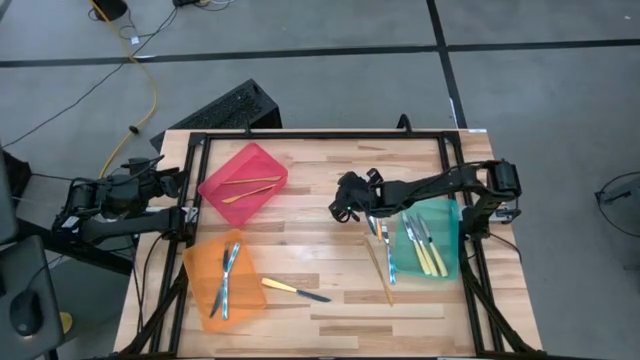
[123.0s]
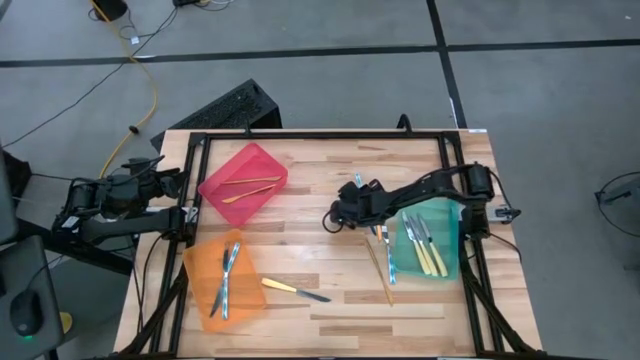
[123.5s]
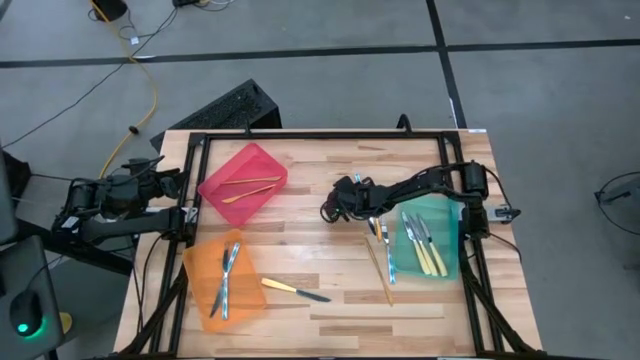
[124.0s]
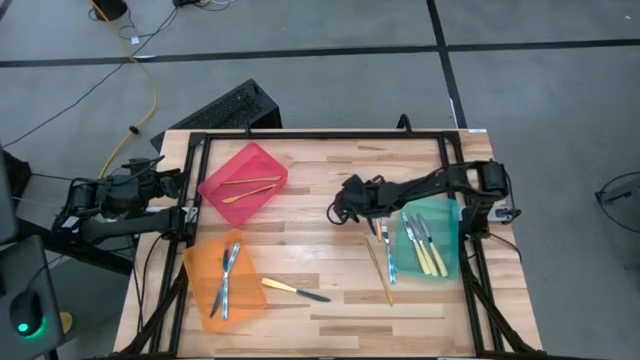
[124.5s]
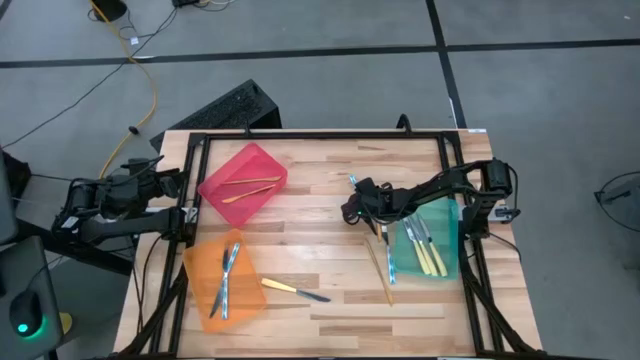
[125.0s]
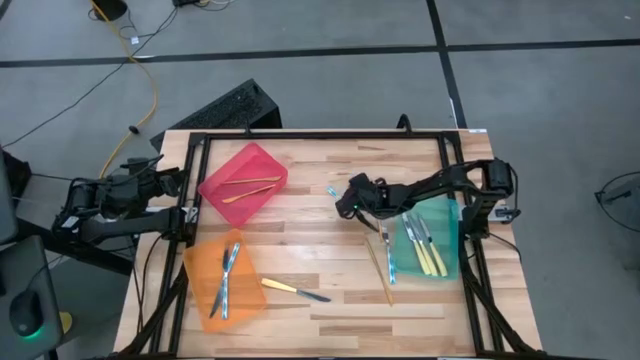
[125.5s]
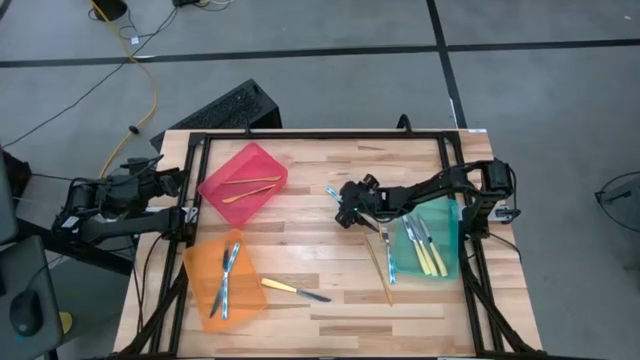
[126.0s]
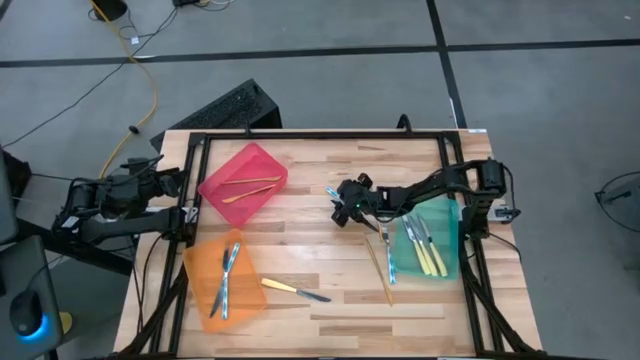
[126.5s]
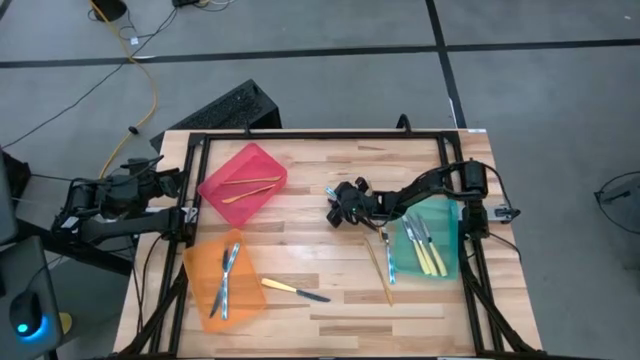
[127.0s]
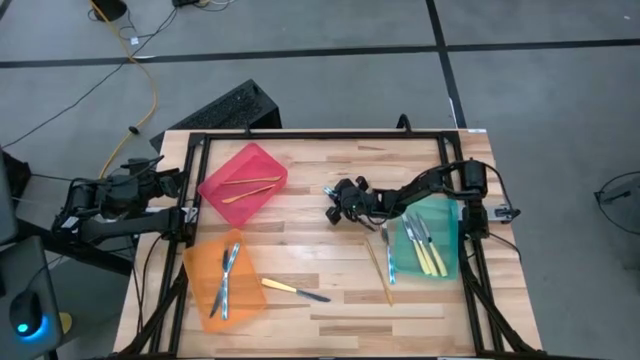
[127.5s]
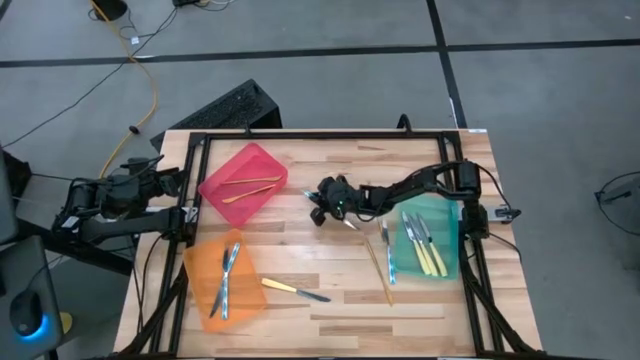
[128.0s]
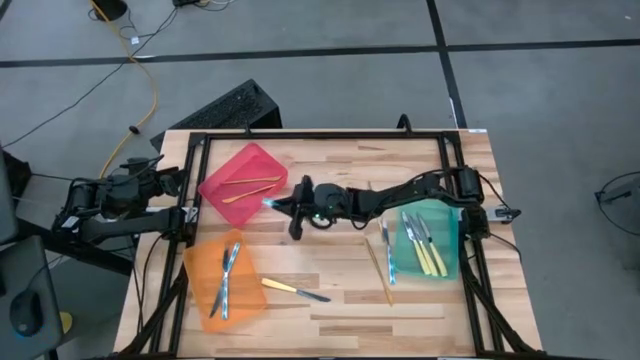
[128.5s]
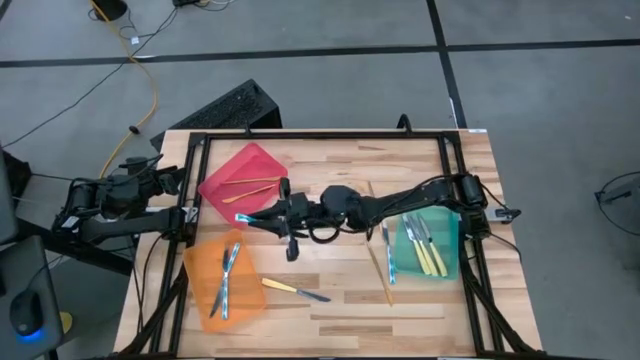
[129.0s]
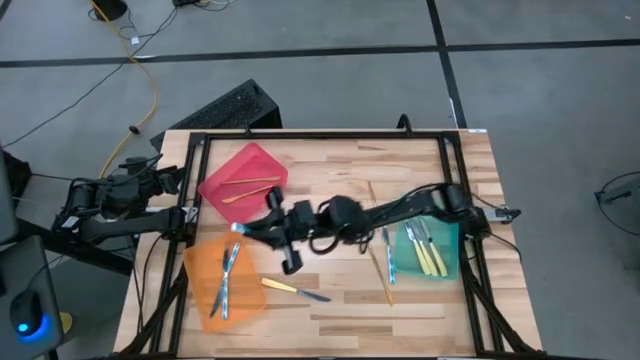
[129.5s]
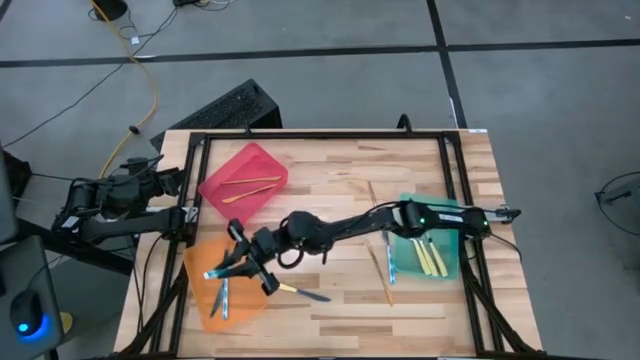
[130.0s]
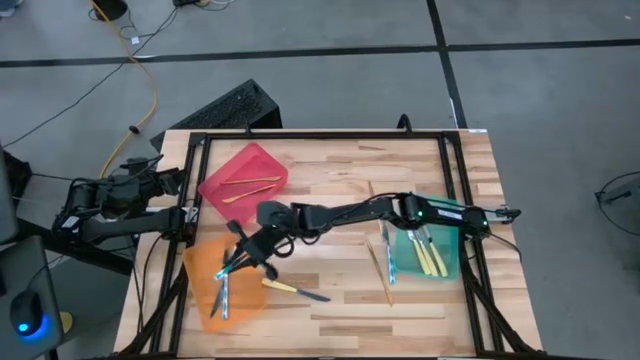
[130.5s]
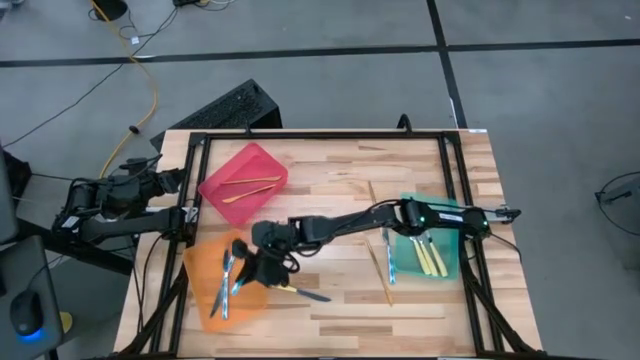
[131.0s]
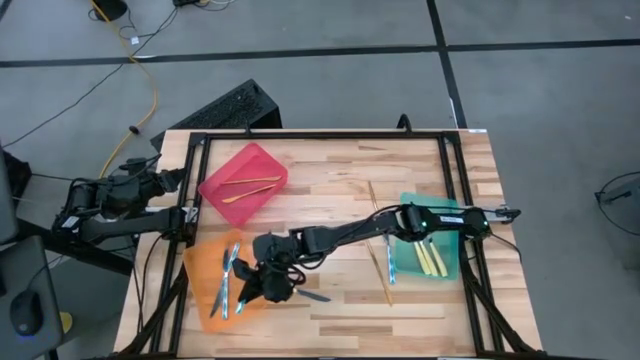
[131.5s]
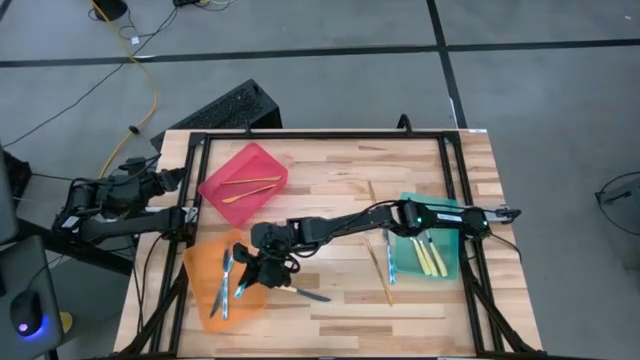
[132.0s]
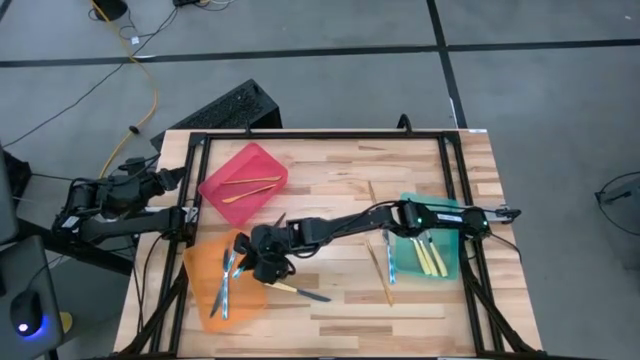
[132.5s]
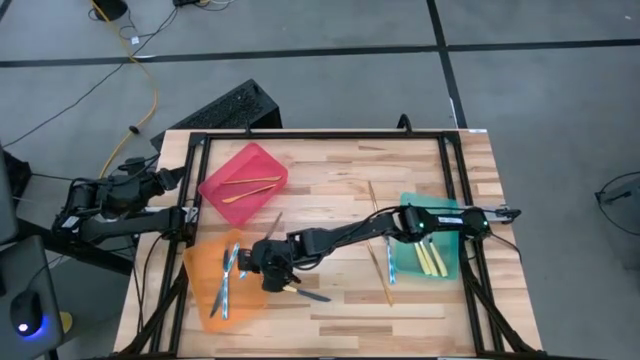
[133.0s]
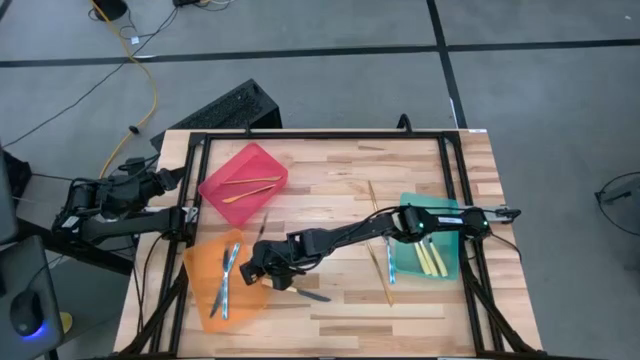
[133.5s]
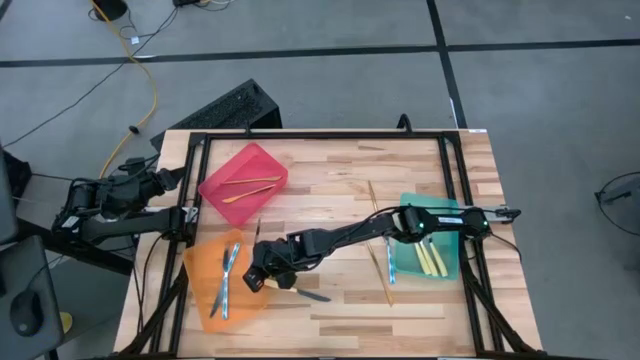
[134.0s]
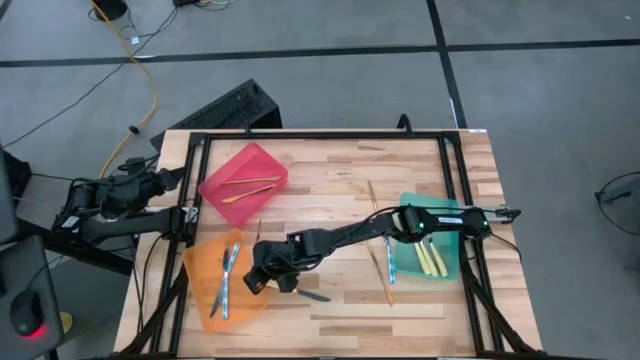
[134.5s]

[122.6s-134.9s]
Task: Sort silverware by color (type)
Put the top blue knife into the orange bin

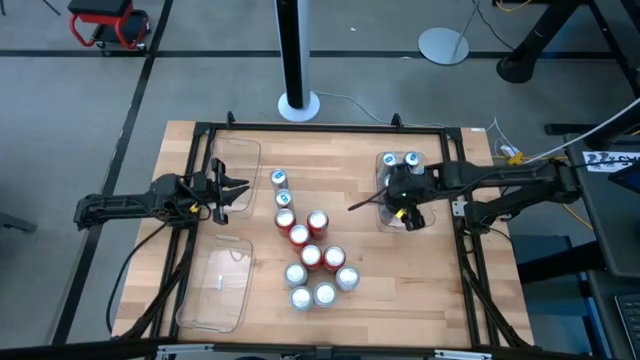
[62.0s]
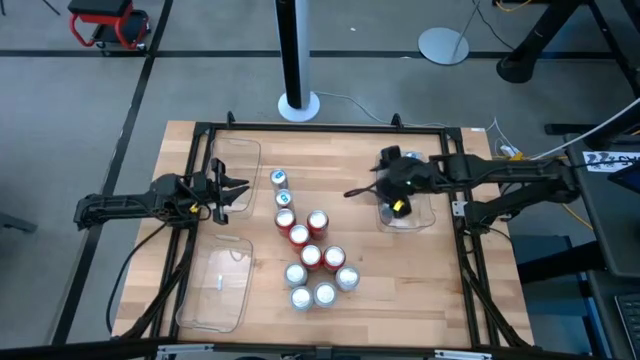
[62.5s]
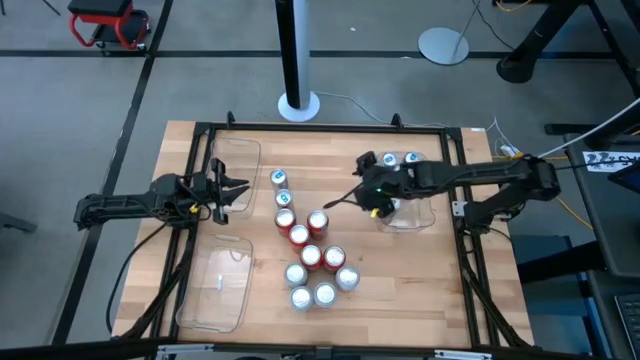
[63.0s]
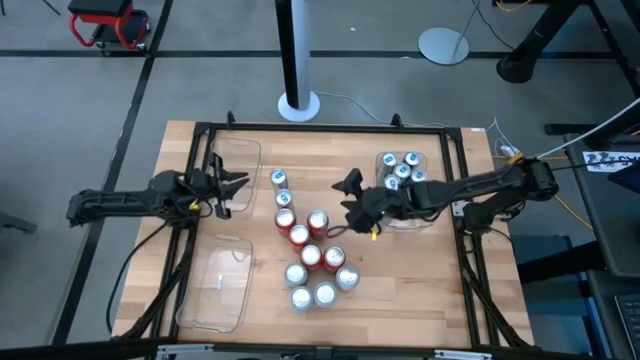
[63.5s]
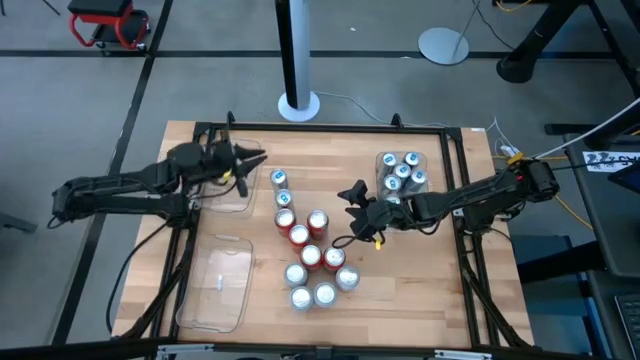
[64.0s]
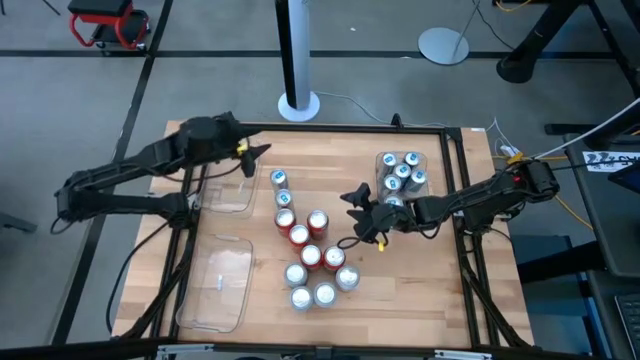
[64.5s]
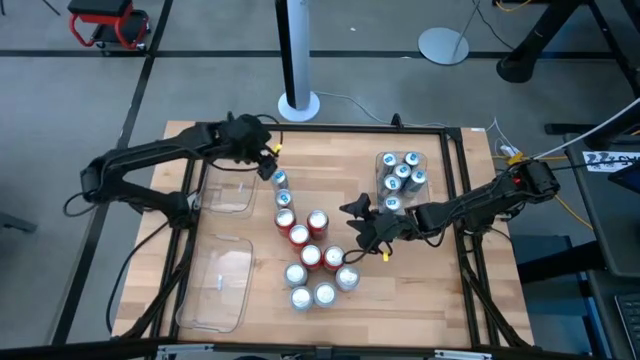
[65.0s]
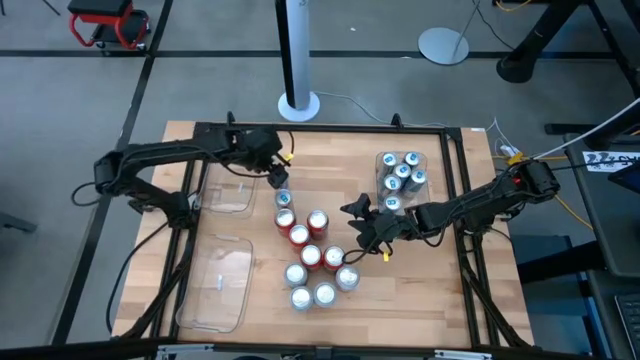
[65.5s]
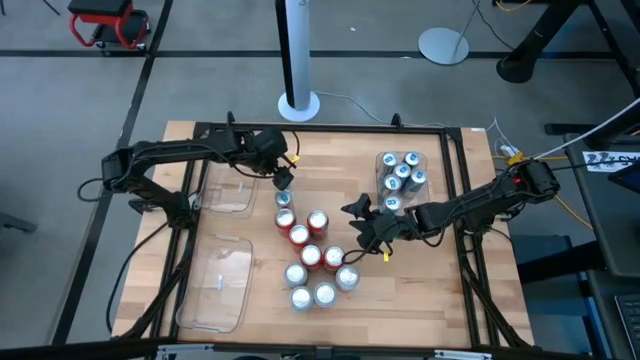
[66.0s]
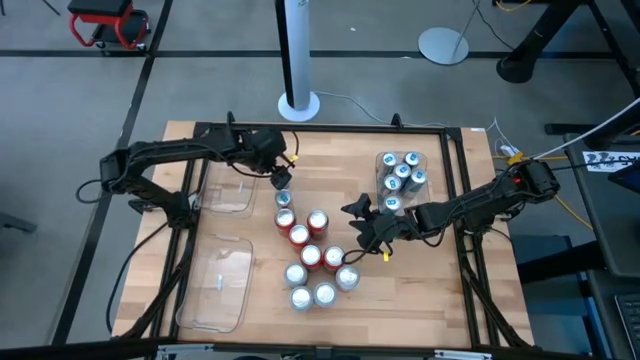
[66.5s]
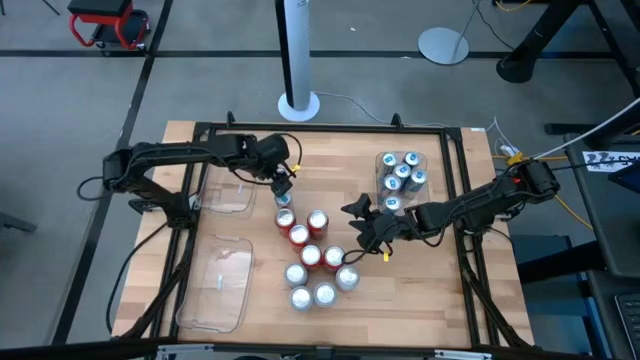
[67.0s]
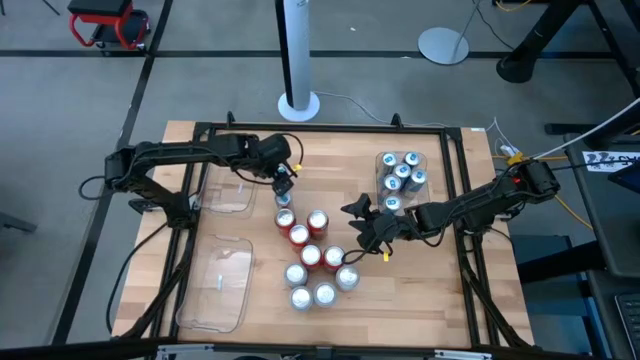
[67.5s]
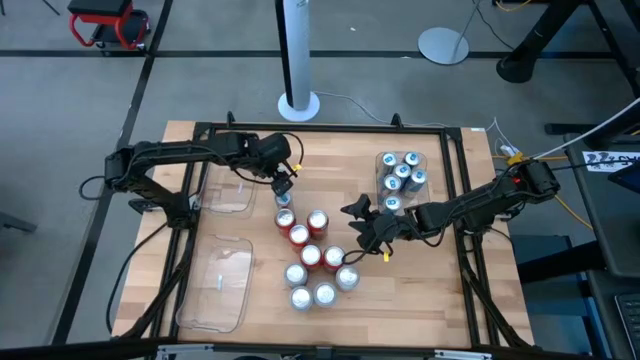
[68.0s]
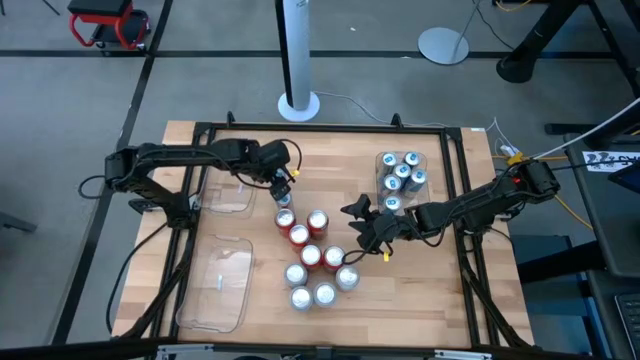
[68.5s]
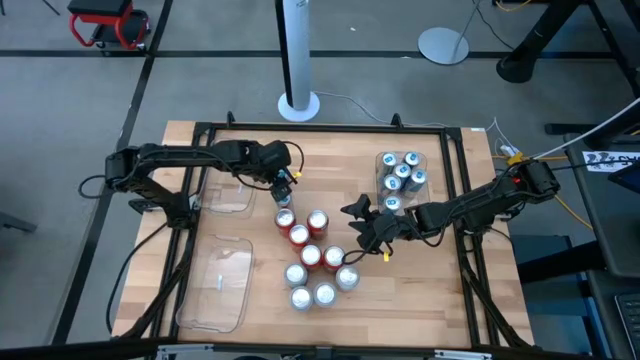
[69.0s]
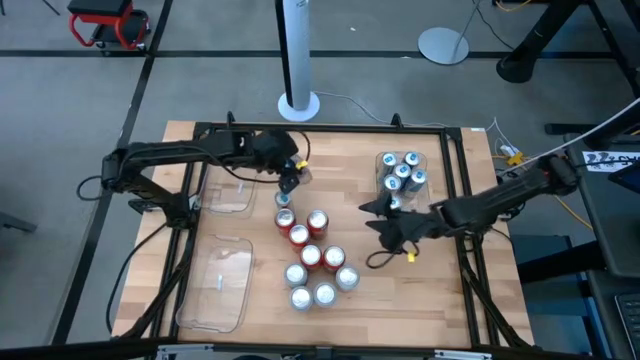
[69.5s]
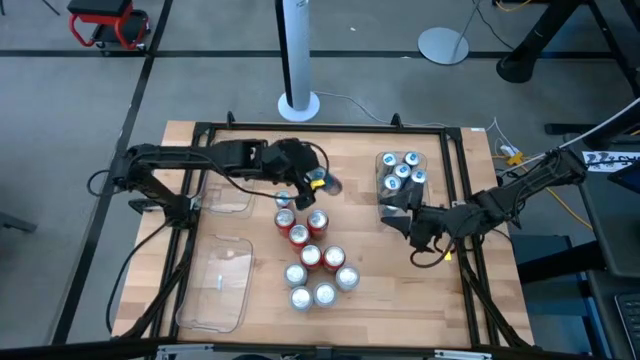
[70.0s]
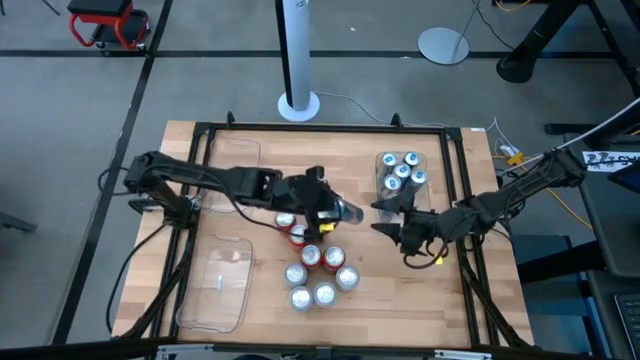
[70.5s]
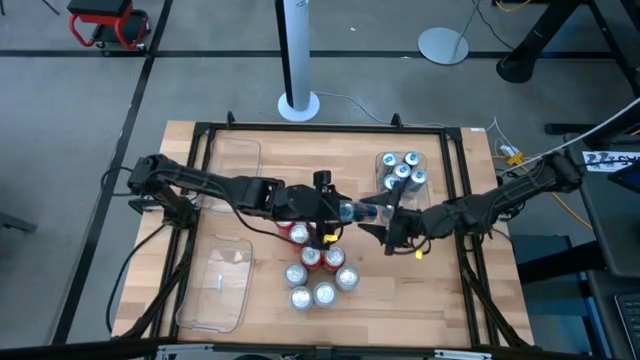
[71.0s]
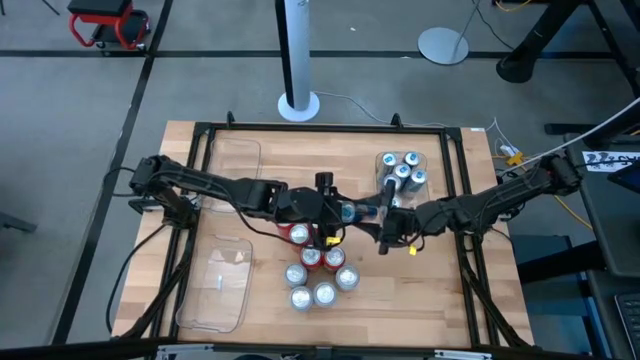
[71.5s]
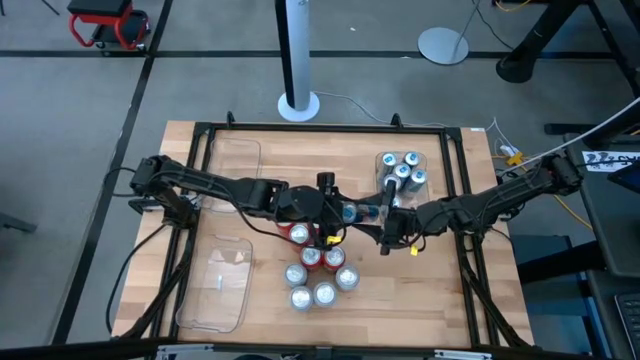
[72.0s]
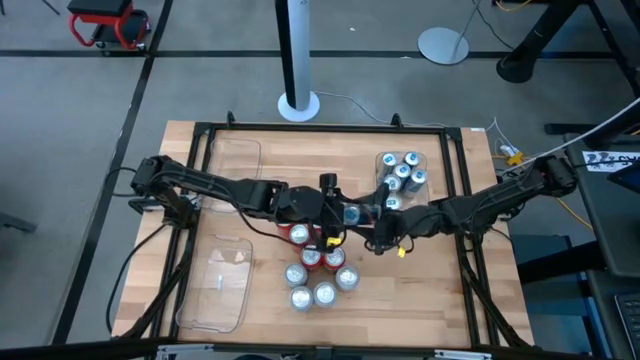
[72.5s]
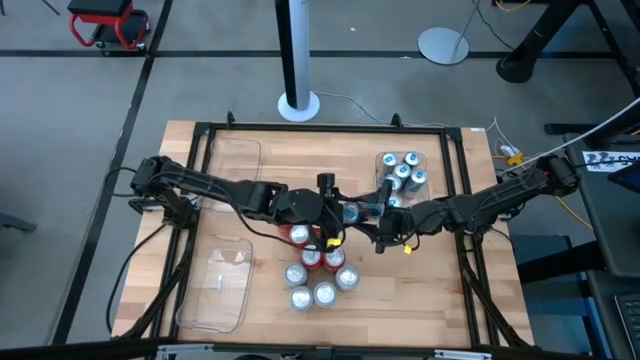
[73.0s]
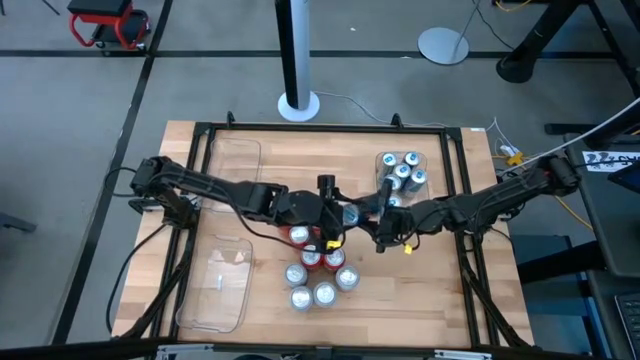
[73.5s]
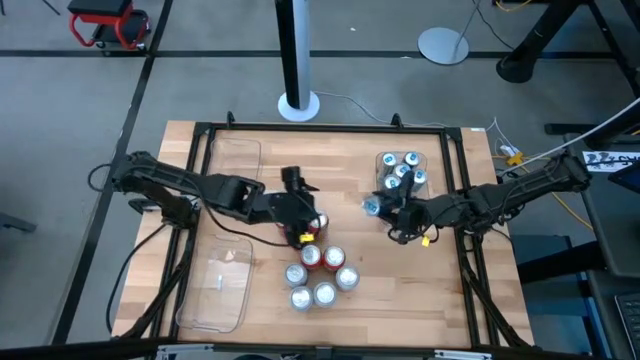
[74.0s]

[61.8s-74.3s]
Task: Sort soda cans
Put the blue soda can in the middle right transparent bin
